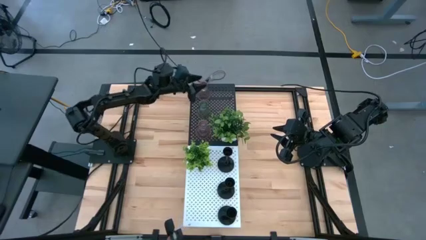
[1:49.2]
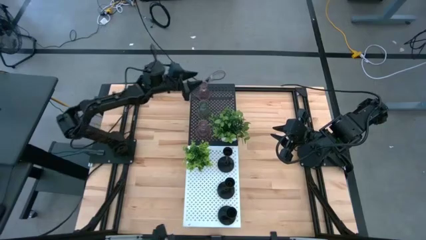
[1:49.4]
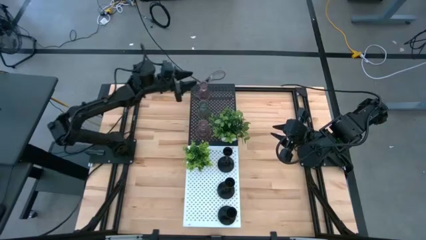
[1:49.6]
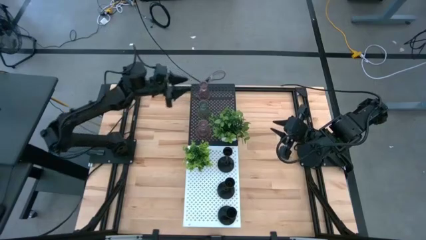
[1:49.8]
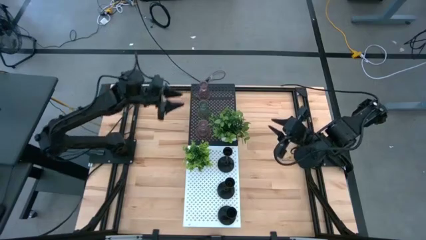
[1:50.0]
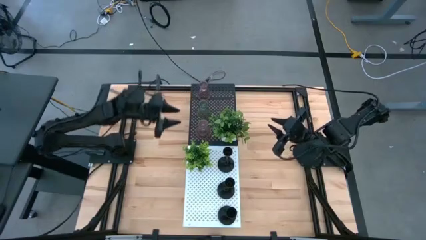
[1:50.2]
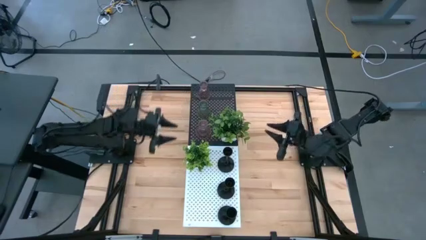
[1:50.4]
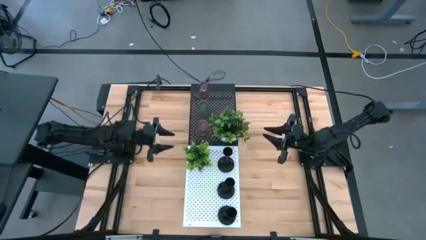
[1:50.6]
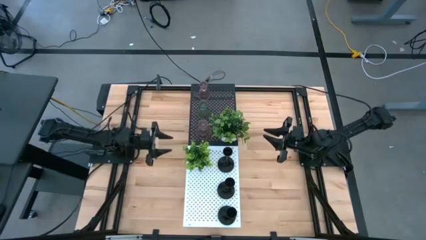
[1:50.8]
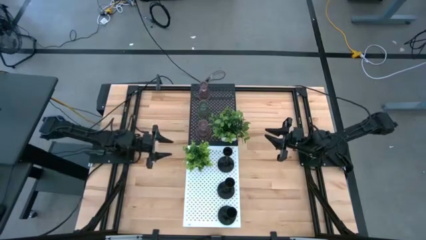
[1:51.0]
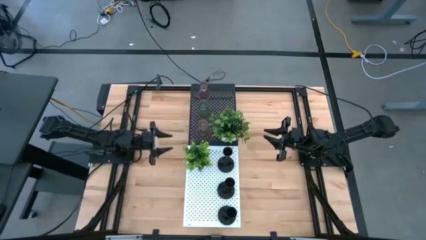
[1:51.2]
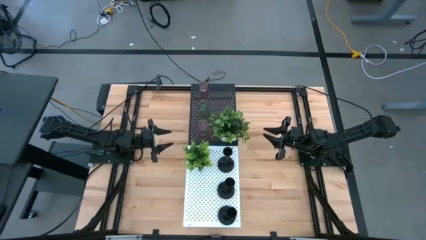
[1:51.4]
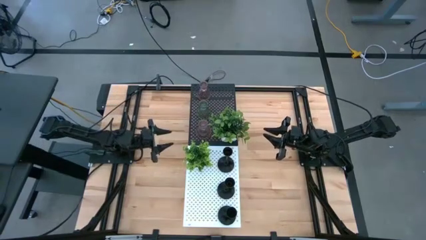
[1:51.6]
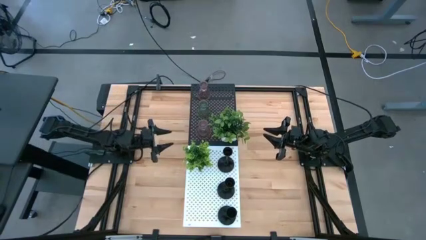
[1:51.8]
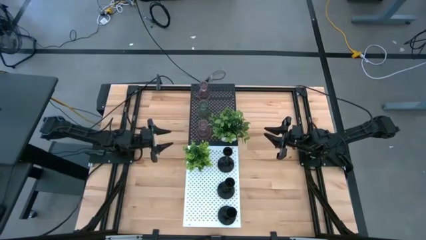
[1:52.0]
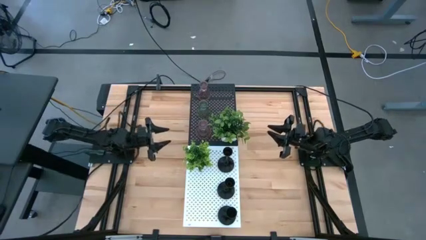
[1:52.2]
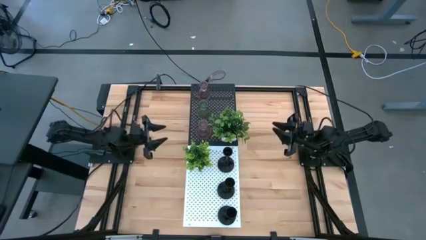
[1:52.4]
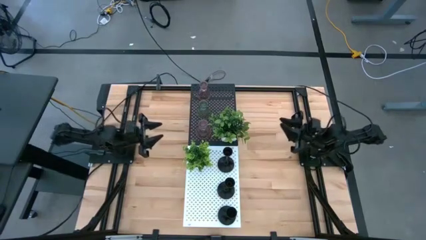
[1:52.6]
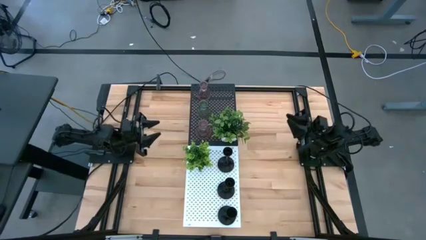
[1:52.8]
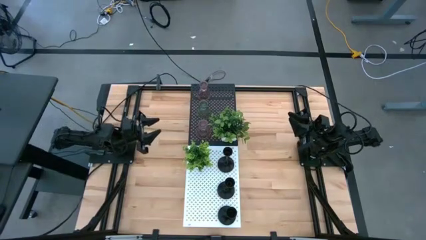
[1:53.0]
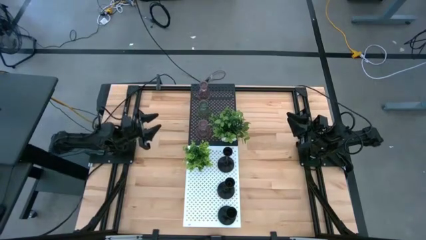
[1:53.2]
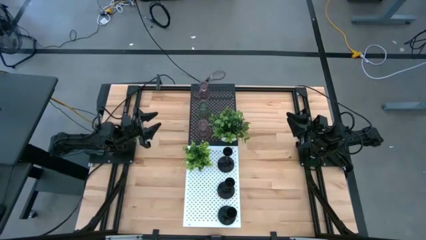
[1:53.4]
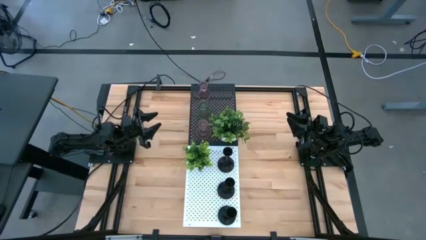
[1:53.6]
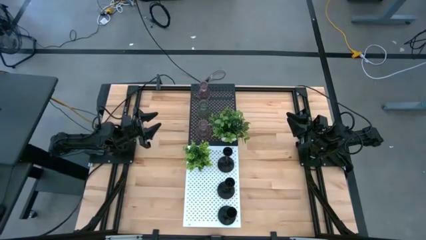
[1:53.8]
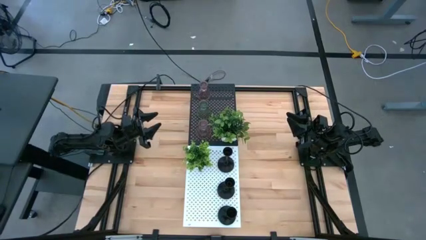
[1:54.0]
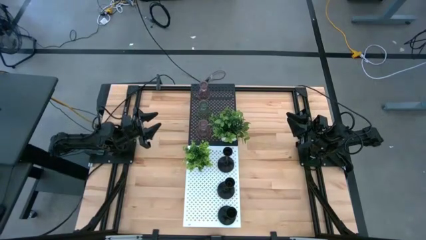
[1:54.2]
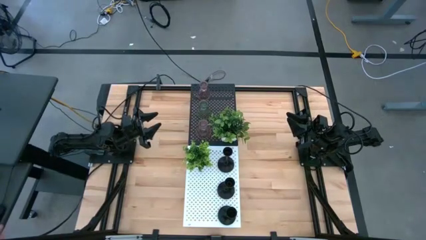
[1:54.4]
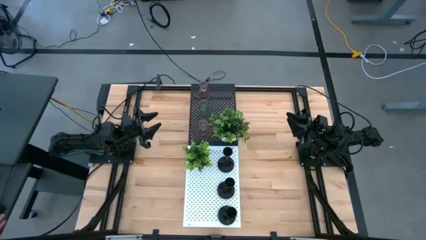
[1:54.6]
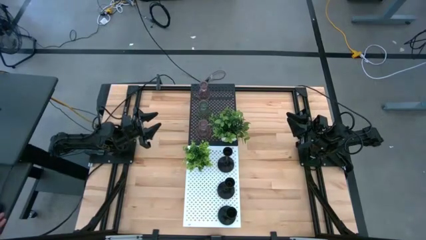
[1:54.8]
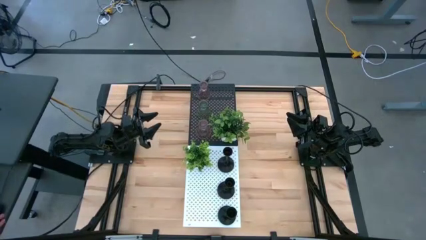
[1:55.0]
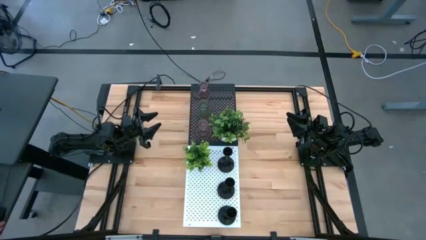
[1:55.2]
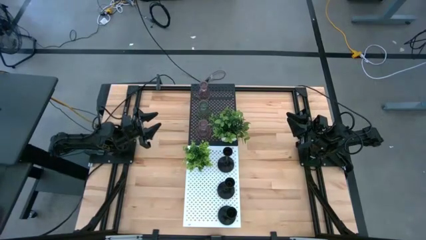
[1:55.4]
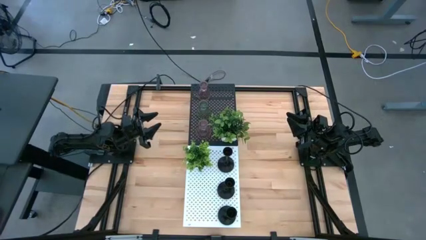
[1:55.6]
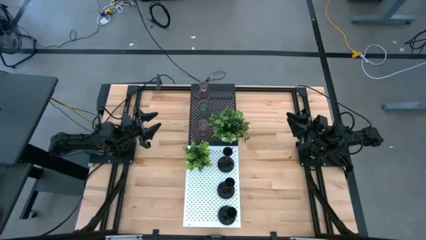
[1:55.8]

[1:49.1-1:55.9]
Task: Pick & Place candle stick holders
Return to Home Position

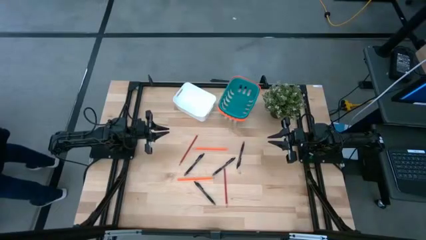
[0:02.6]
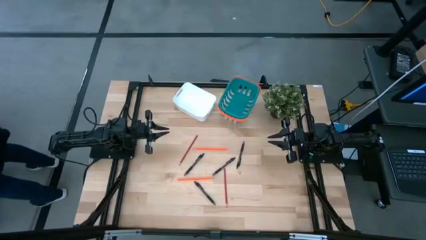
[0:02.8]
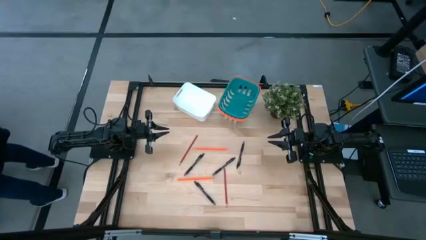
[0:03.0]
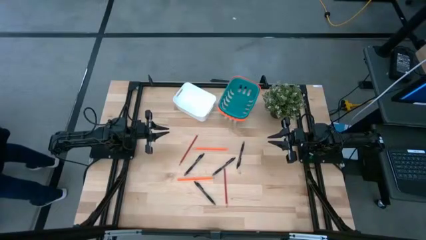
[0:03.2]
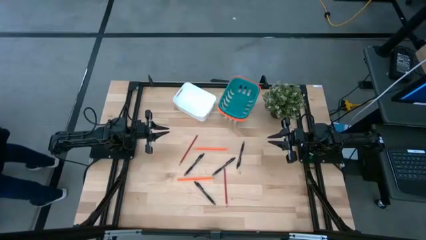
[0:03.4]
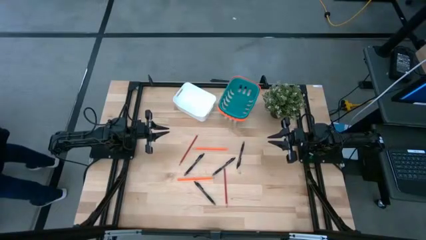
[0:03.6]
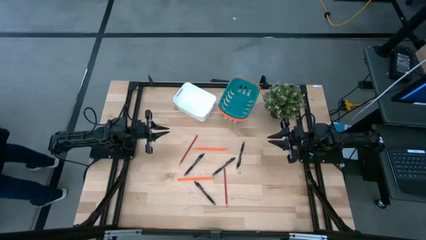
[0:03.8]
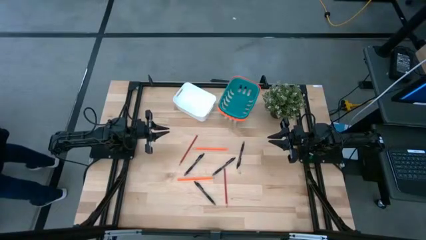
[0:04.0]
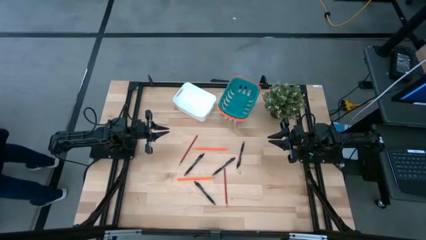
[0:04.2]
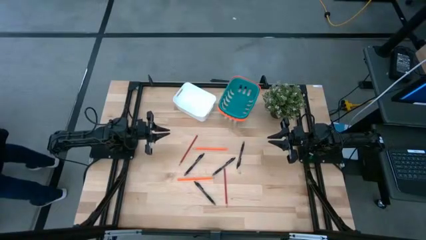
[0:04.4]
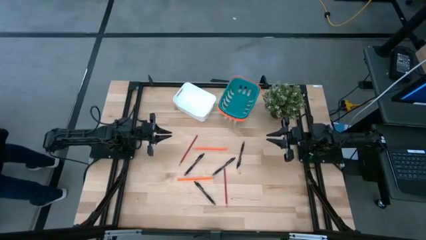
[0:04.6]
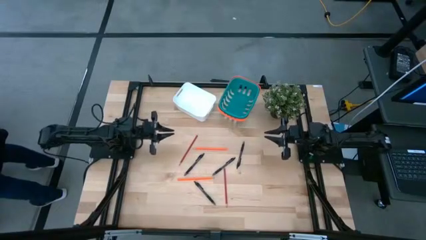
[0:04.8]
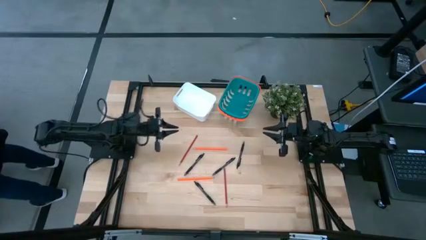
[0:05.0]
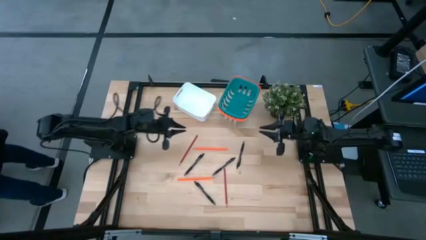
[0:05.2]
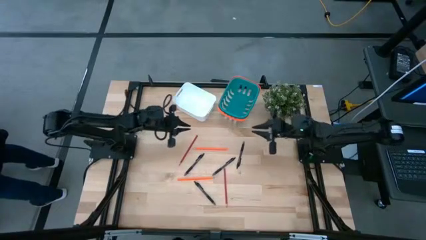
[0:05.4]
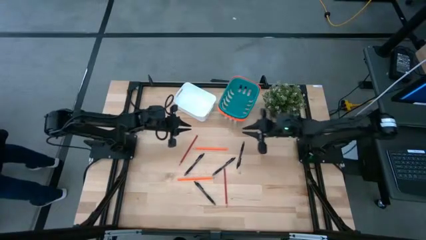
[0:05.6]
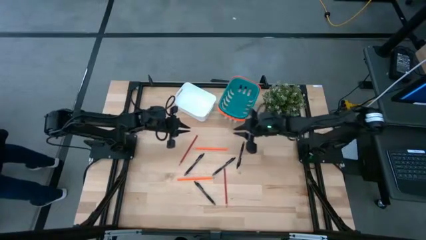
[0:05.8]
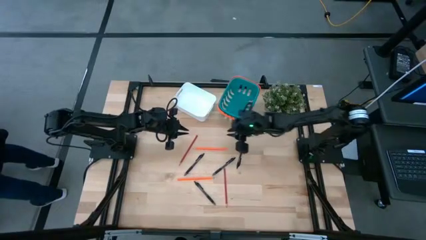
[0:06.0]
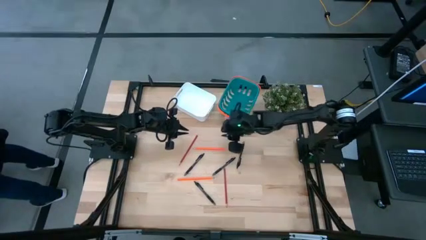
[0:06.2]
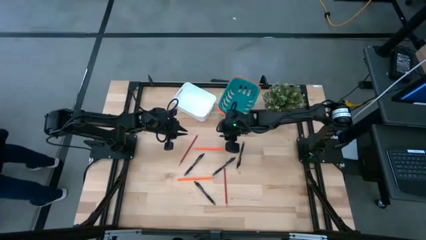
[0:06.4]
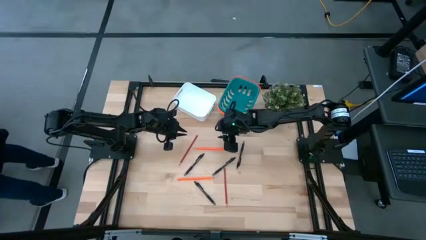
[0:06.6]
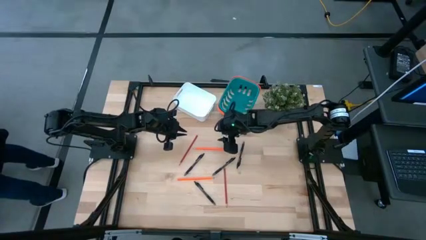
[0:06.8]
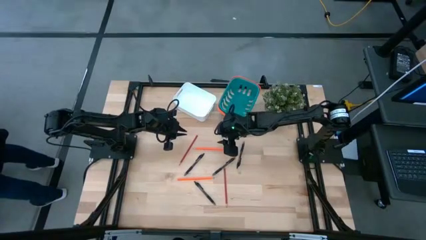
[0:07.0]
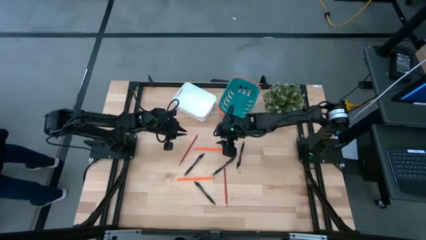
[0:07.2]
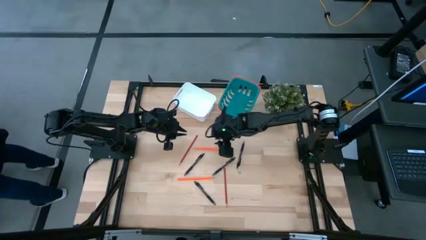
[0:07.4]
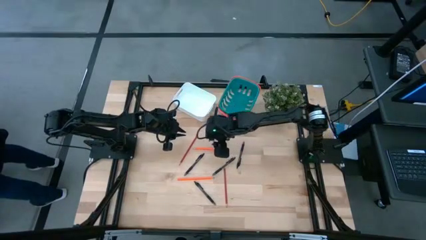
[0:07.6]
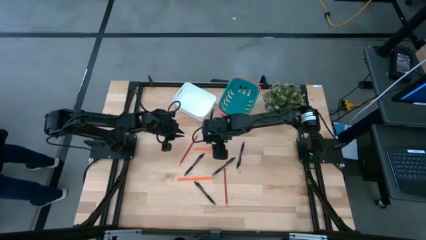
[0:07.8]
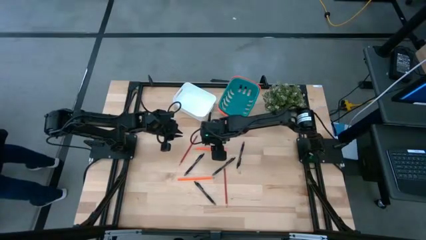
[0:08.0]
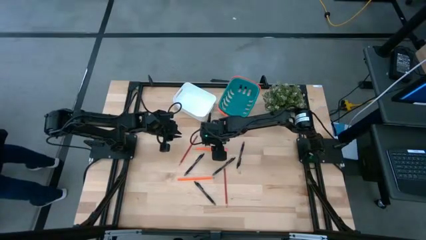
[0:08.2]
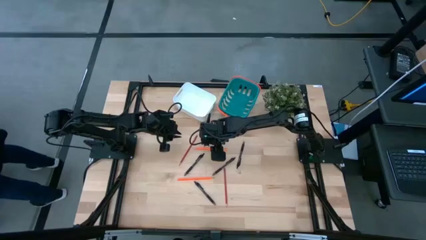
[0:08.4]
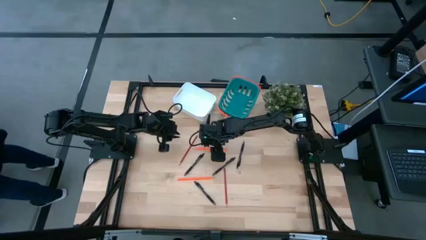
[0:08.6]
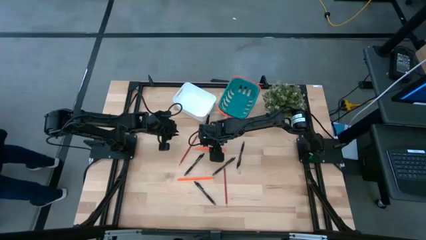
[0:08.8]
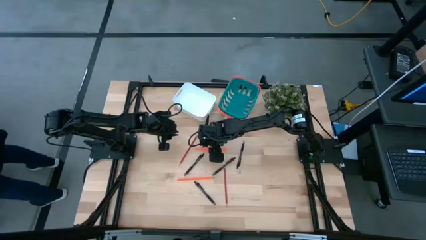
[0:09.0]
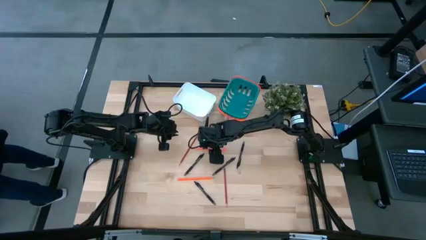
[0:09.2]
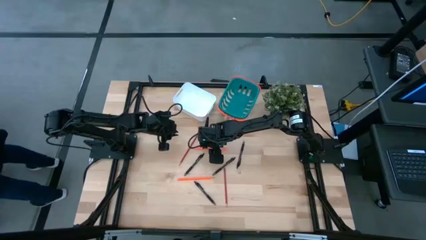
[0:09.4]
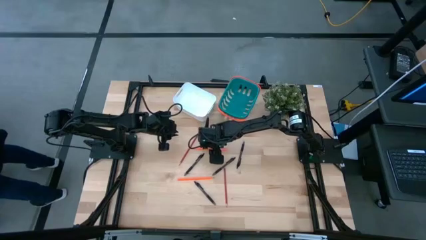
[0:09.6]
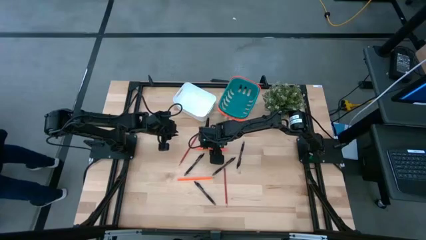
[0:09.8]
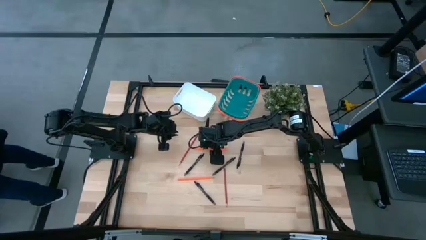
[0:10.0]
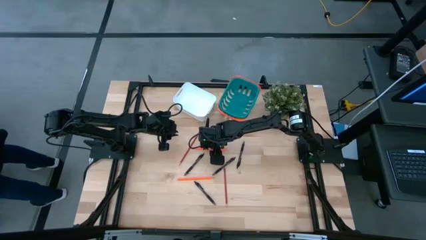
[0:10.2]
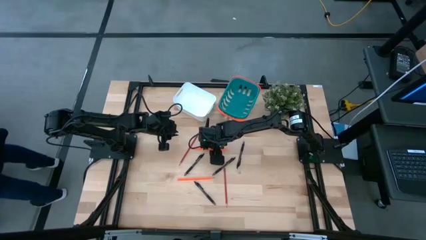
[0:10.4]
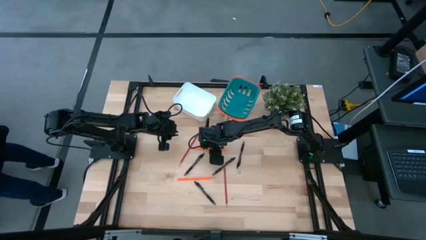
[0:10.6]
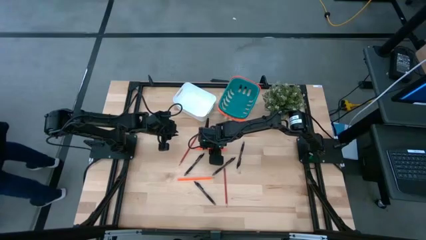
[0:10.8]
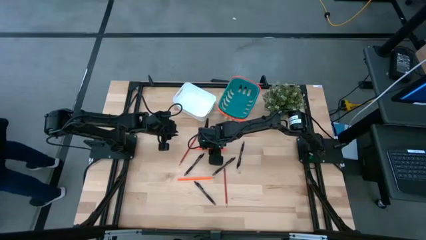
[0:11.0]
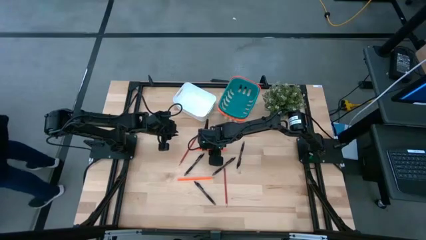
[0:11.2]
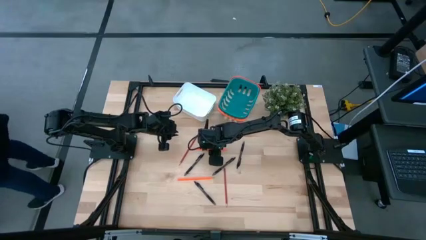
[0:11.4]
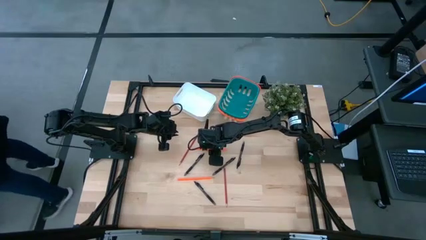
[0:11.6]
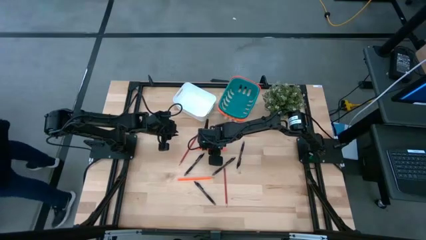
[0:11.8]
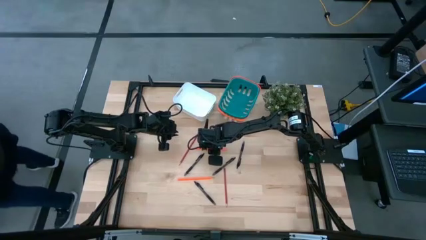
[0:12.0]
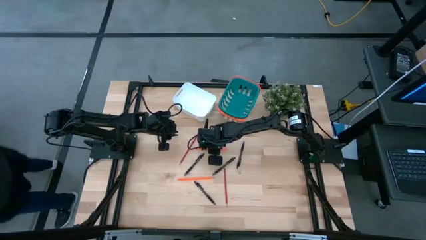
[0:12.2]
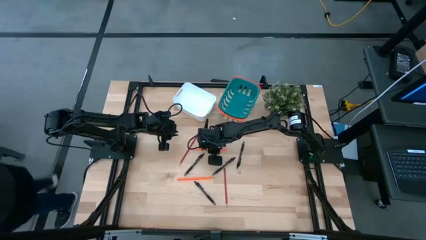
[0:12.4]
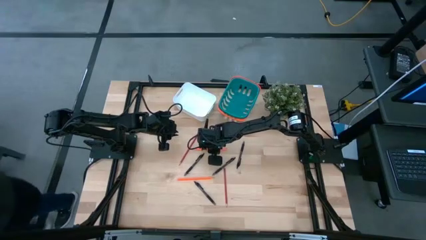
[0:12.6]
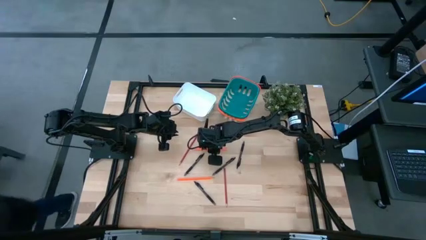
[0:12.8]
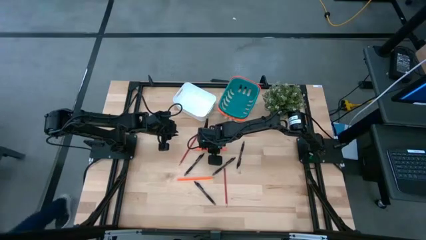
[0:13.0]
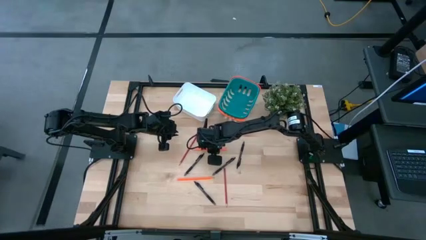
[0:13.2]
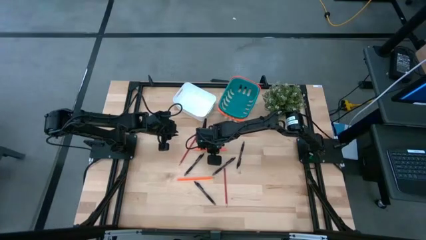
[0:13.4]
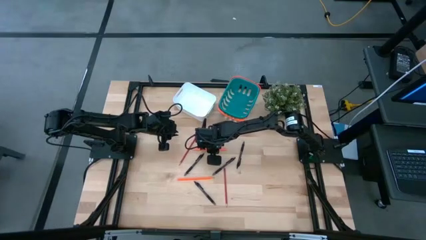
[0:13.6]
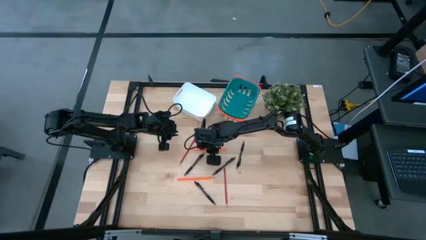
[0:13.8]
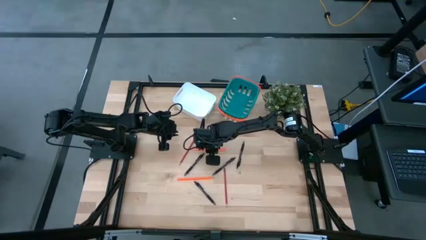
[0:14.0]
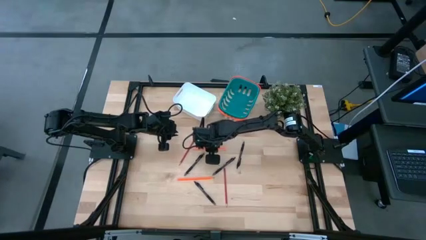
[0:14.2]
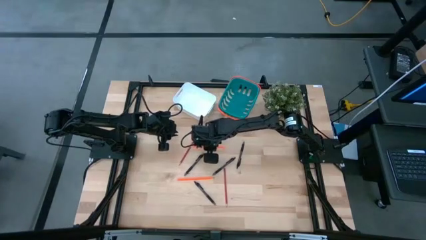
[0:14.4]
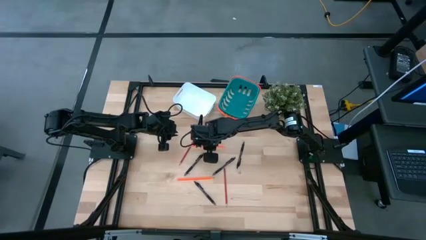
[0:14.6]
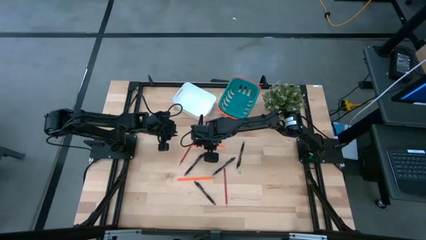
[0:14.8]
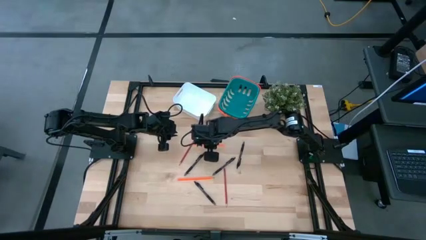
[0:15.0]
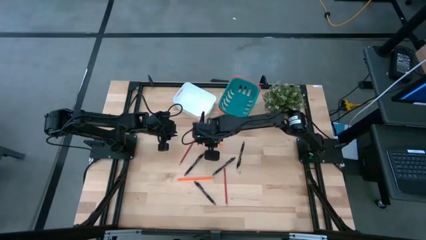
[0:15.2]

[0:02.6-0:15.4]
Task: Sort pens & pencils
Put the orange pencil into the green basket
